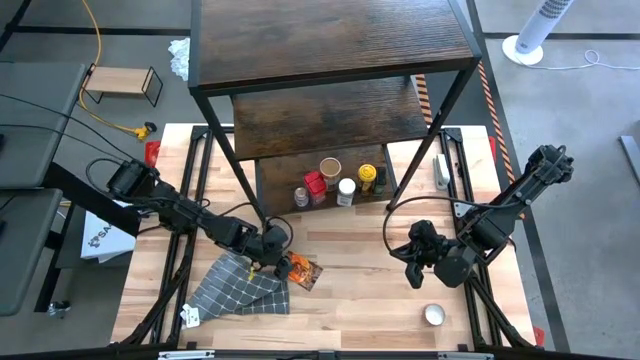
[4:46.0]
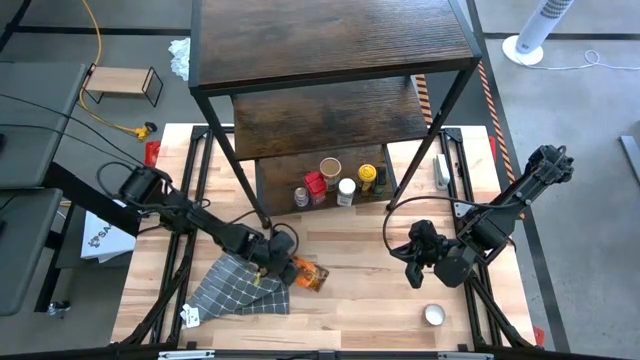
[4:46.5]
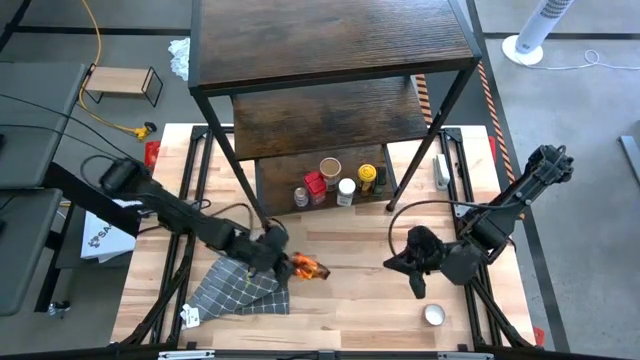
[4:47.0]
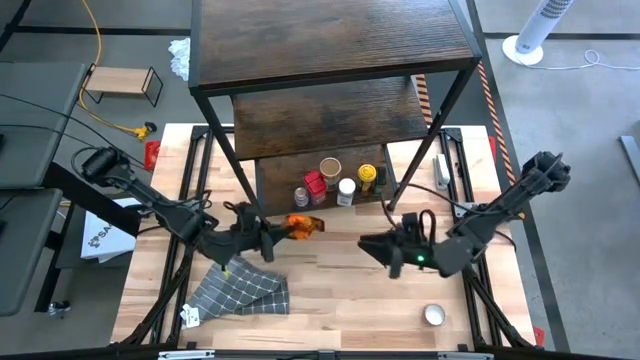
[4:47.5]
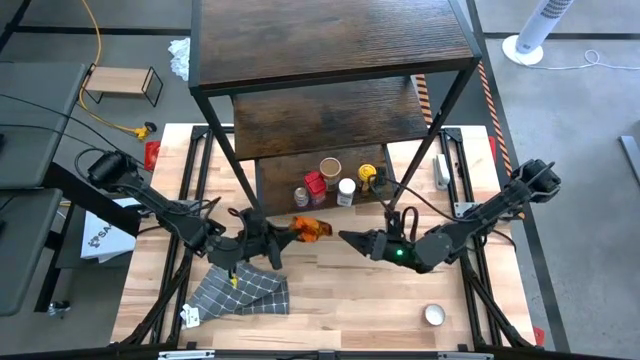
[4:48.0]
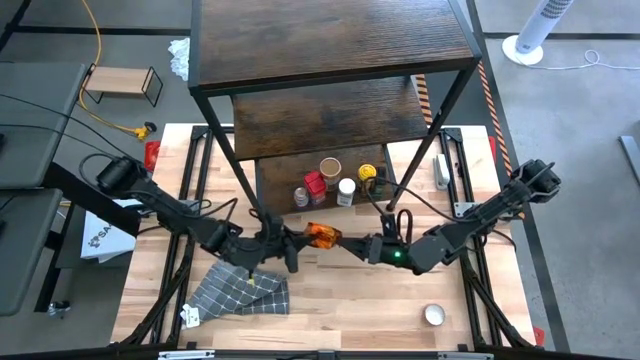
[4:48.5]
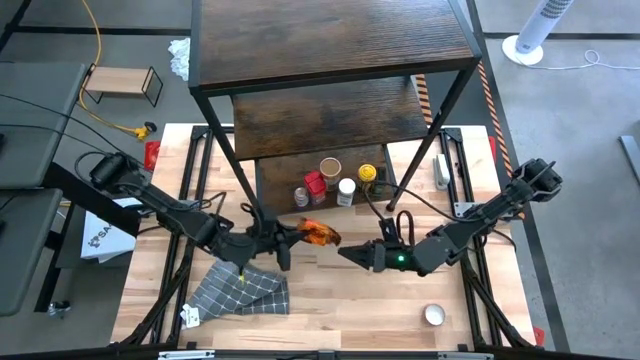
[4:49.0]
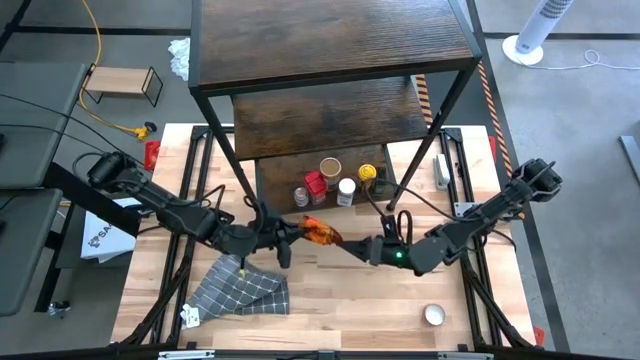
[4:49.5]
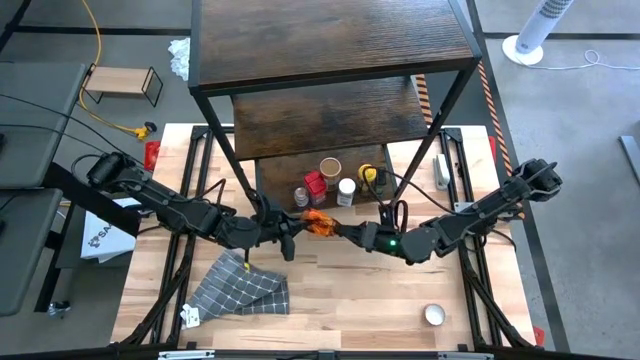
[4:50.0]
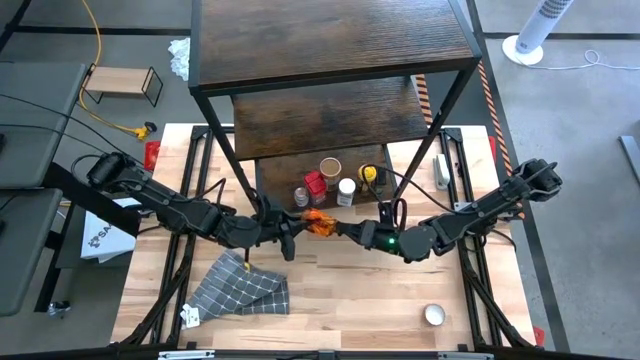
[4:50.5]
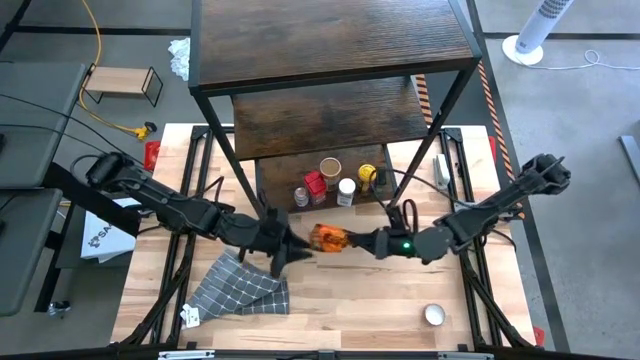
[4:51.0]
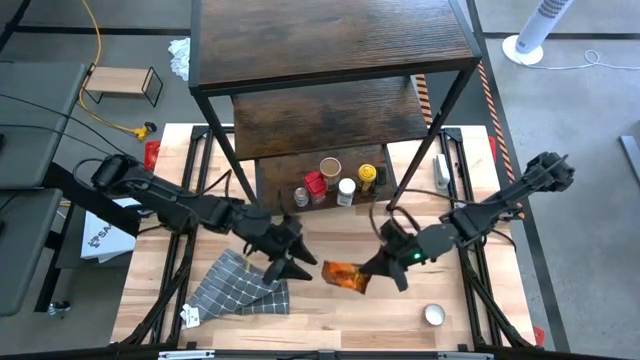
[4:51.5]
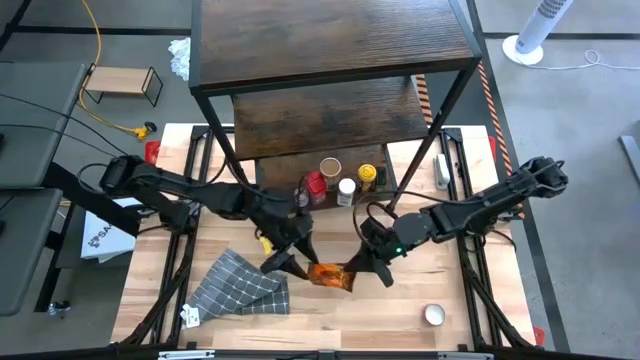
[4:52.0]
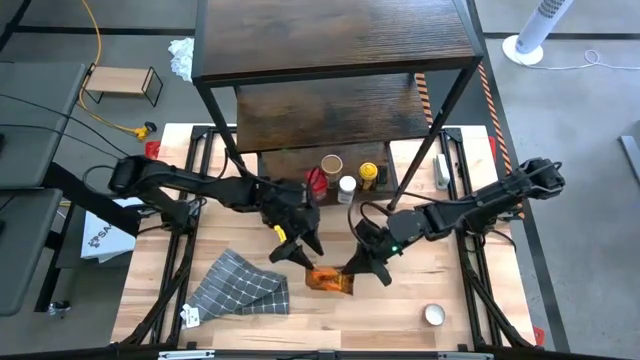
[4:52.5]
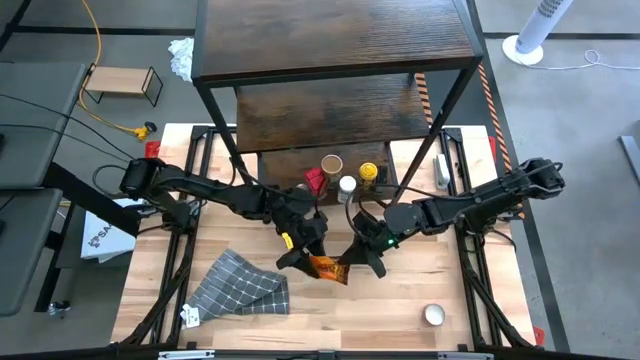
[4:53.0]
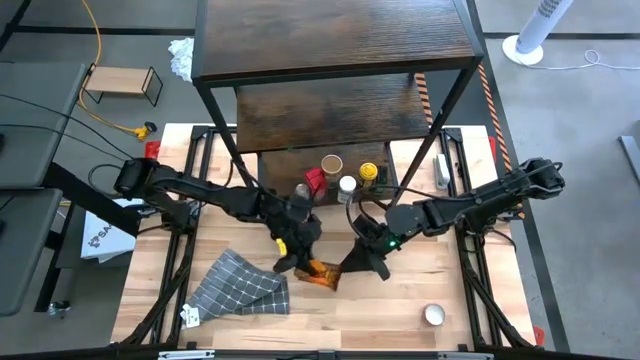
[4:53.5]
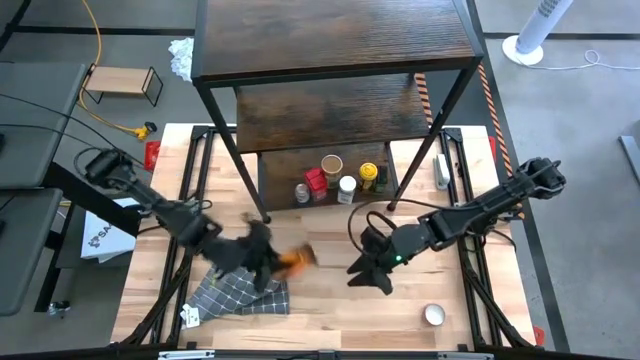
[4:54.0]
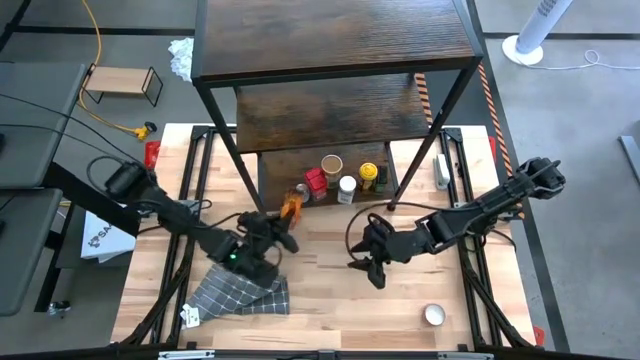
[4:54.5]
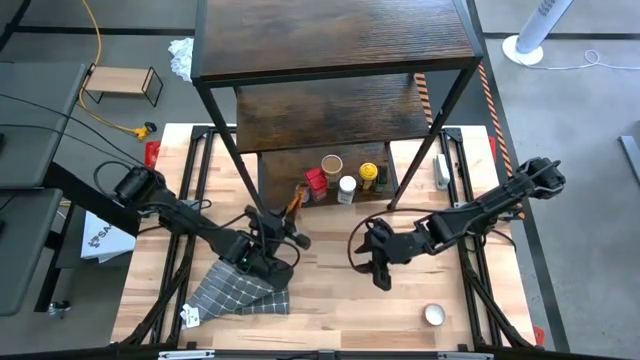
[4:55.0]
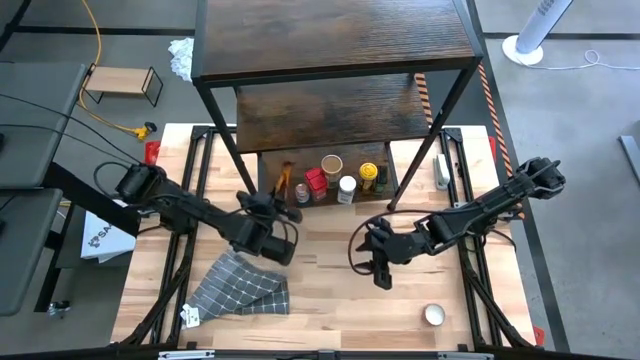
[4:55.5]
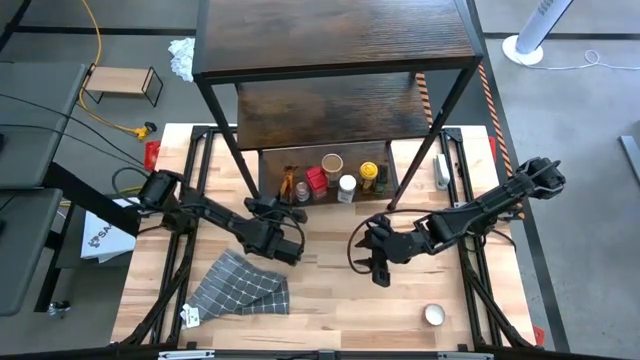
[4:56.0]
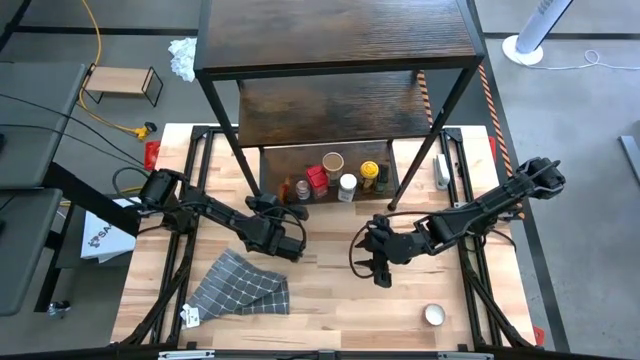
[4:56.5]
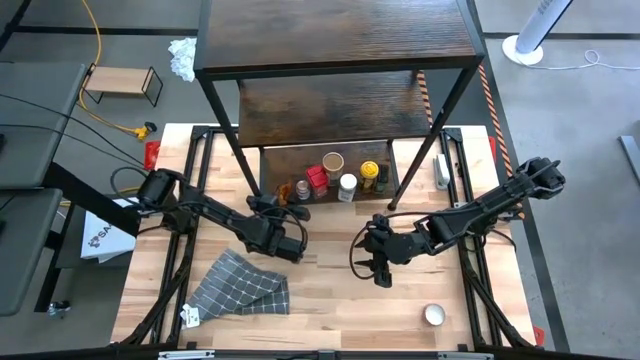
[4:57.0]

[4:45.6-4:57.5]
Task: Shelf spices
Put the orange seasoning pack on the shelf

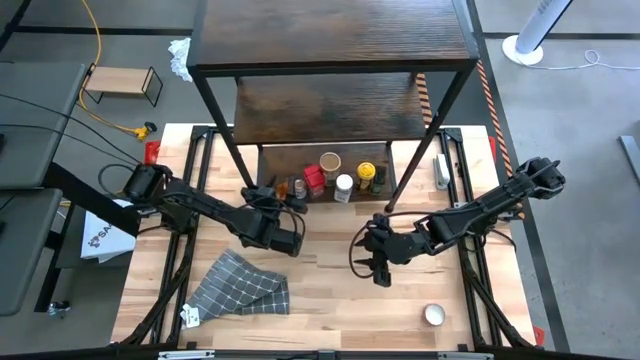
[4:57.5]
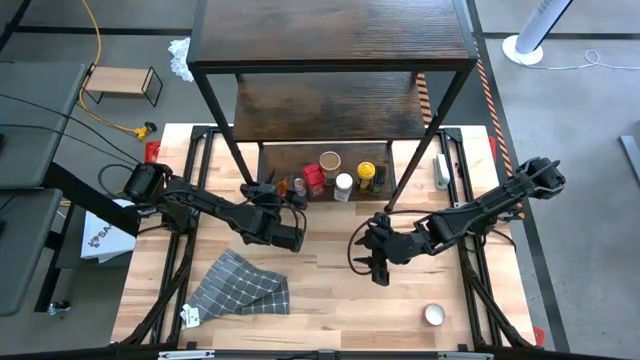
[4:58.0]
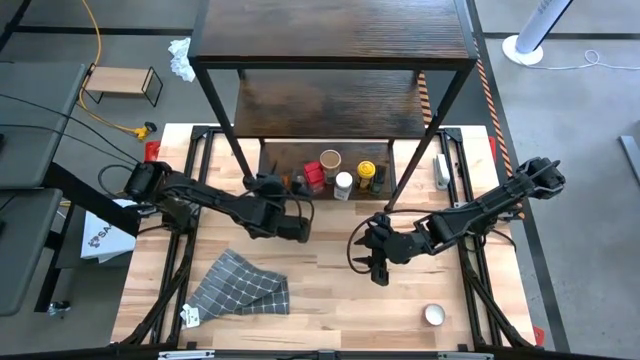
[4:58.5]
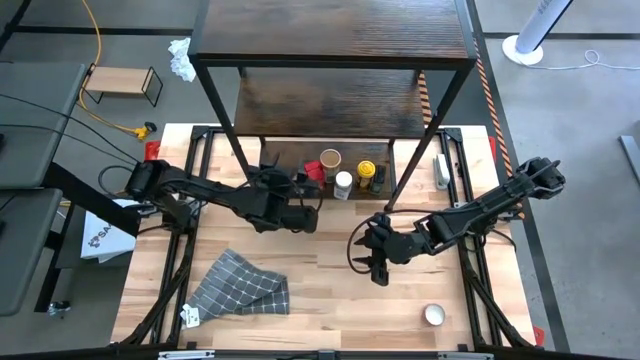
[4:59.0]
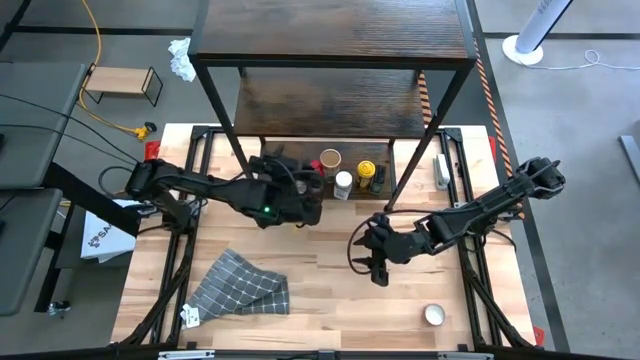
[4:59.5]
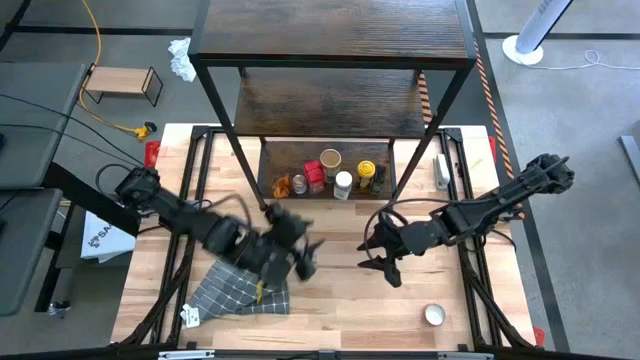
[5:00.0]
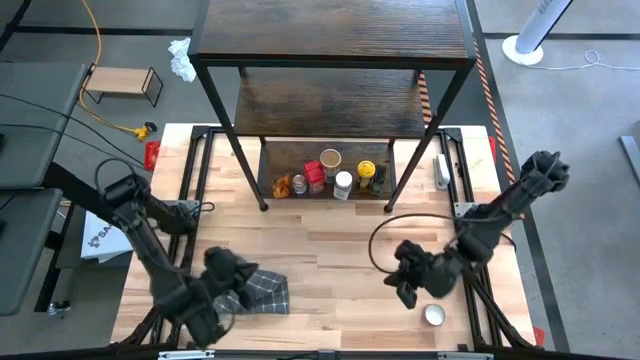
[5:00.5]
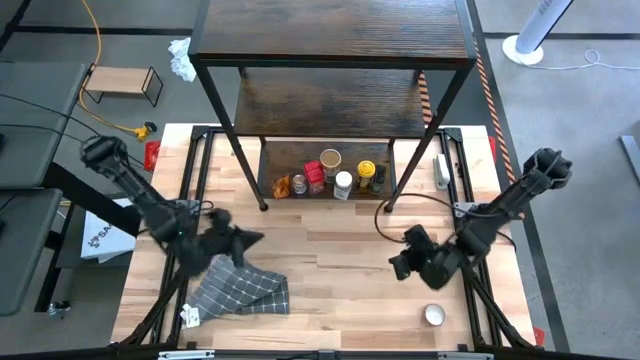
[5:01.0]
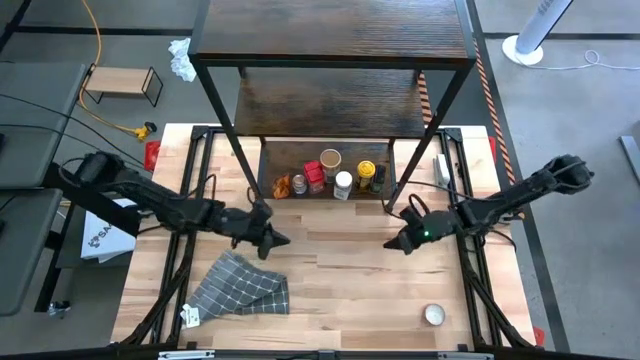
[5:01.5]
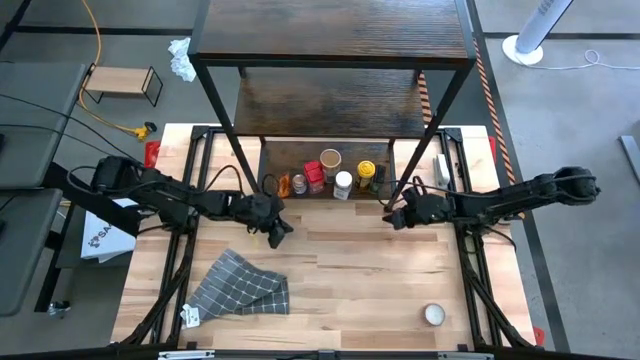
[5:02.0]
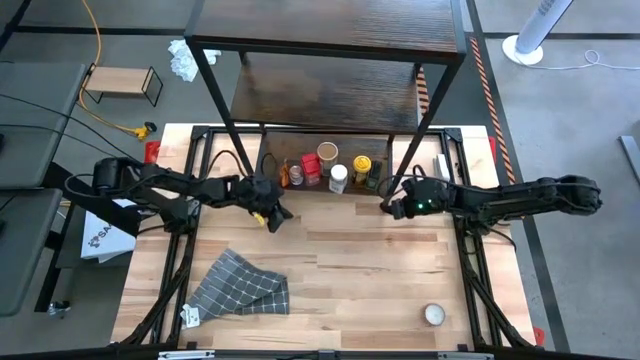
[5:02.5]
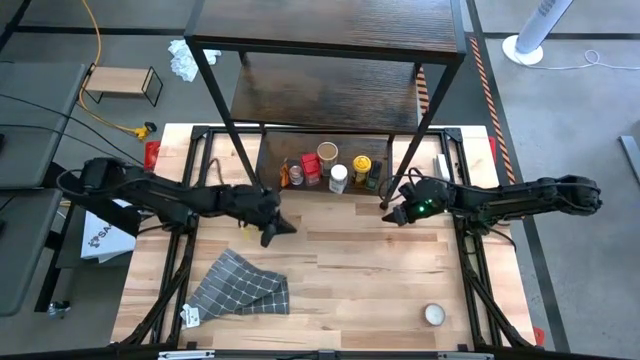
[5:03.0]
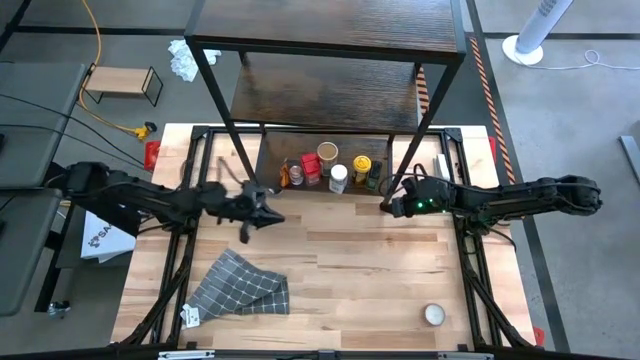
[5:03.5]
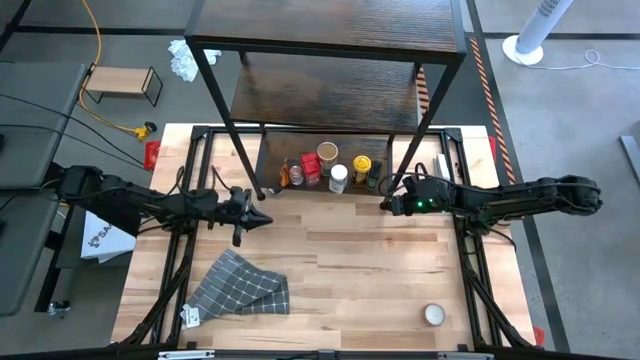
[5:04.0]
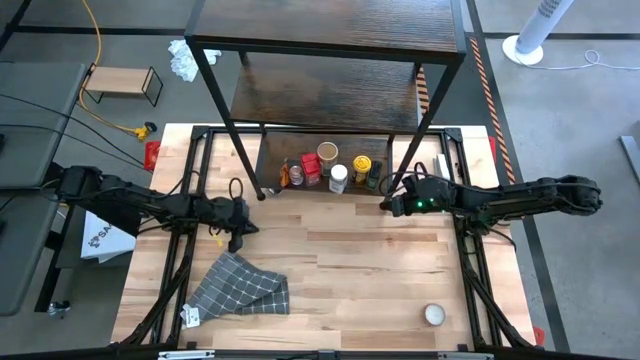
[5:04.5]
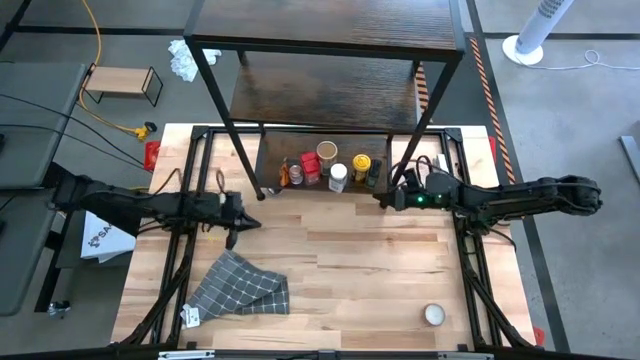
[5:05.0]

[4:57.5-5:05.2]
Adjust the shelf

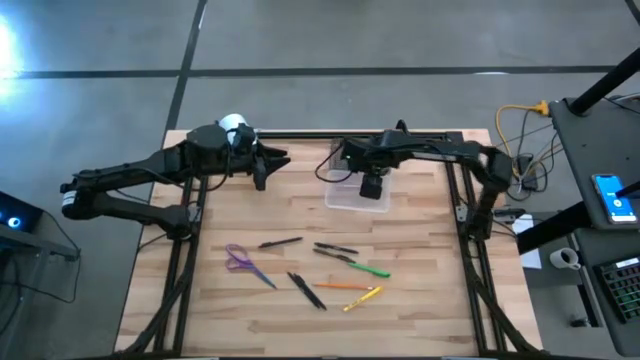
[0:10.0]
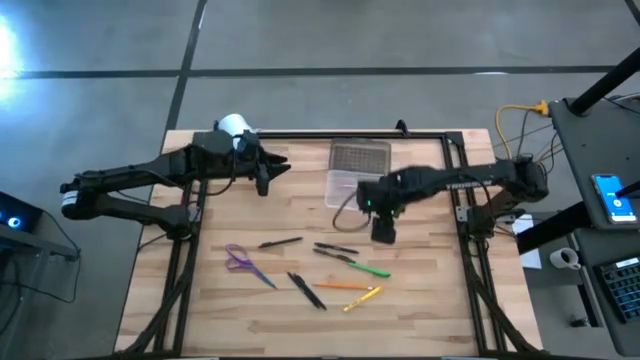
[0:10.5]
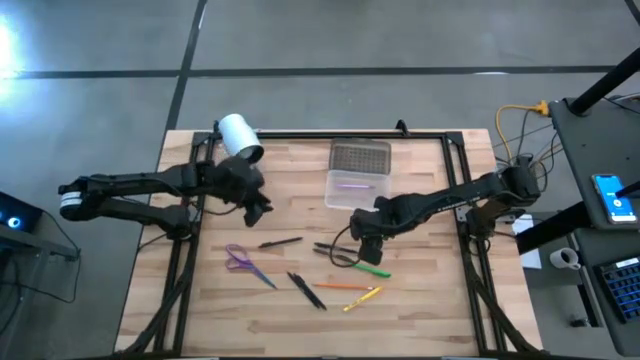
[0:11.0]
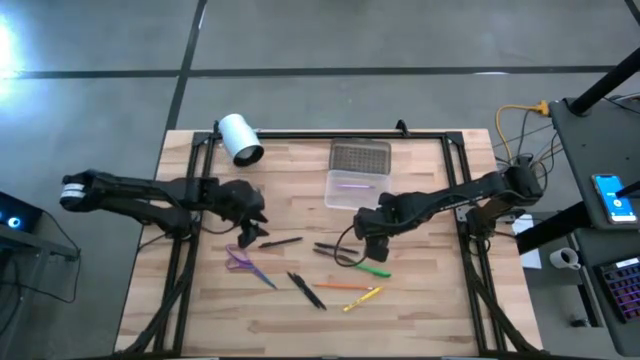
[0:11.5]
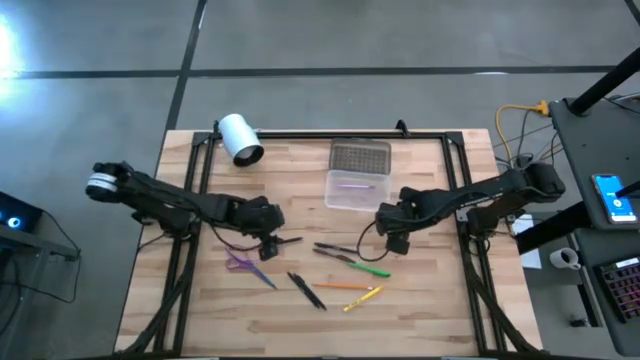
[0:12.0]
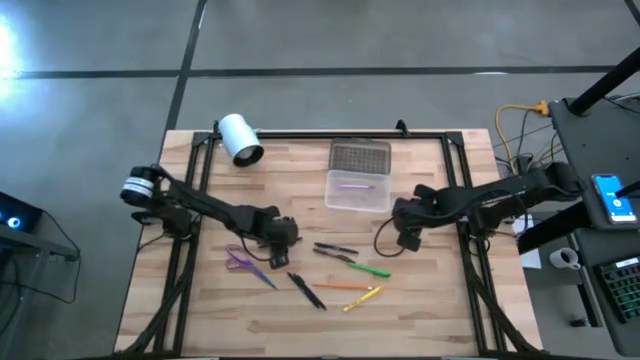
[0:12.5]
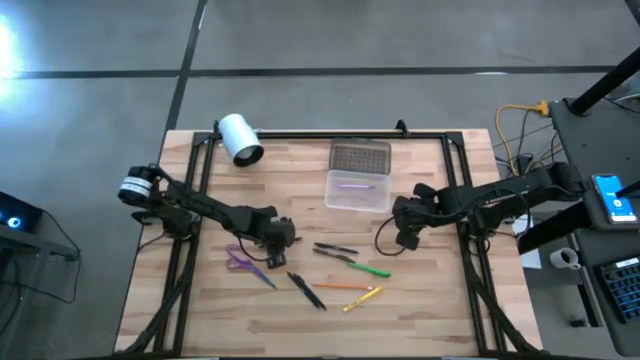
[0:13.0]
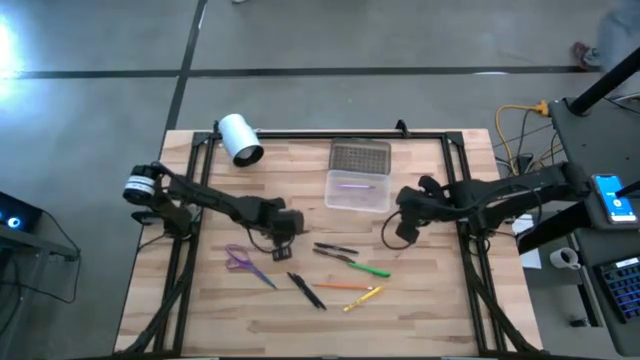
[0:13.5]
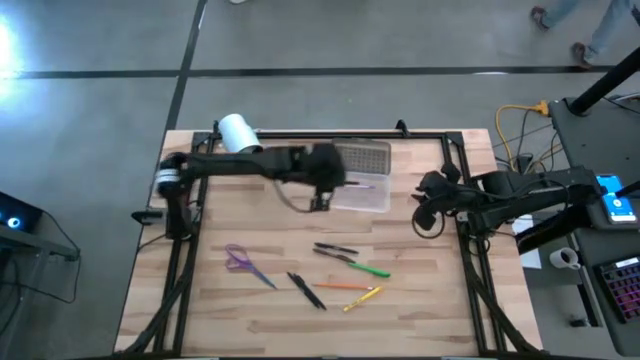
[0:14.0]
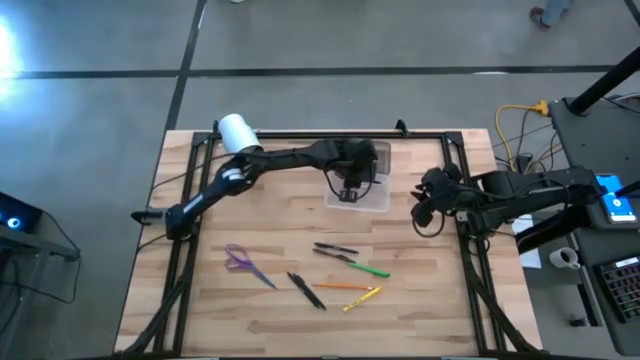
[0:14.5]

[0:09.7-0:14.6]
Task: Pick & place school supplies into a supply box
Put the black pen into the supply box
